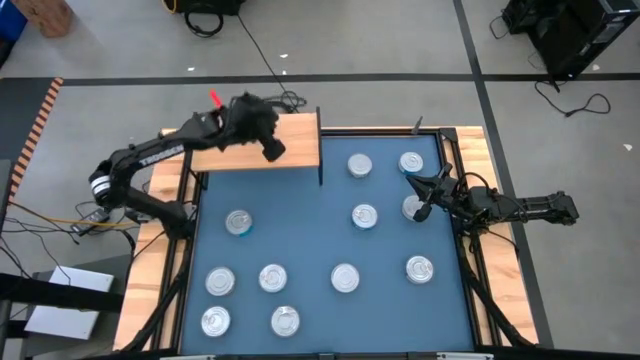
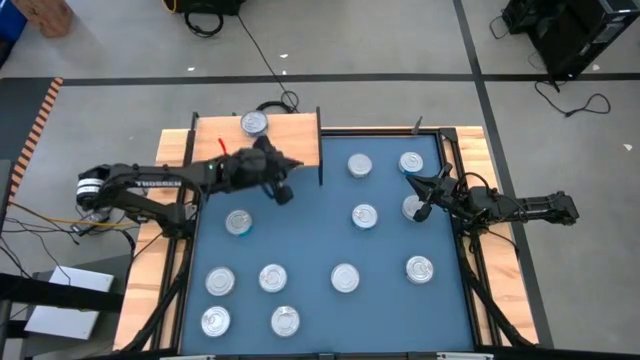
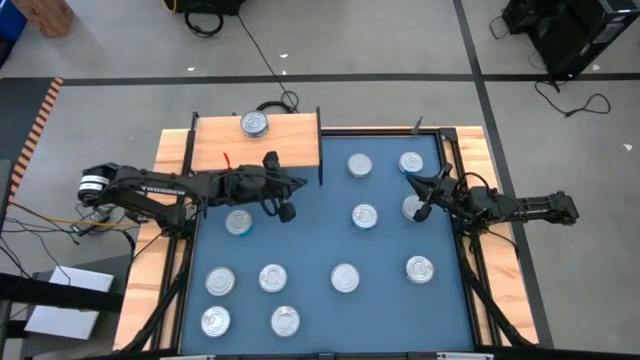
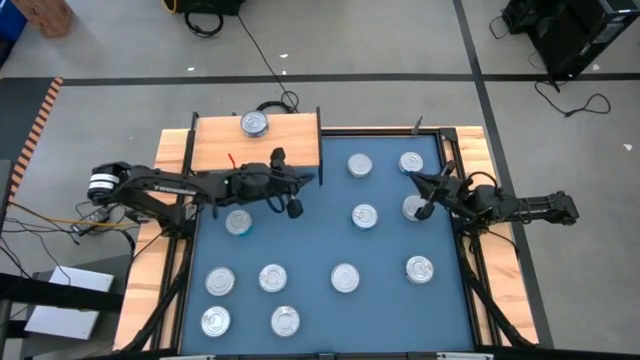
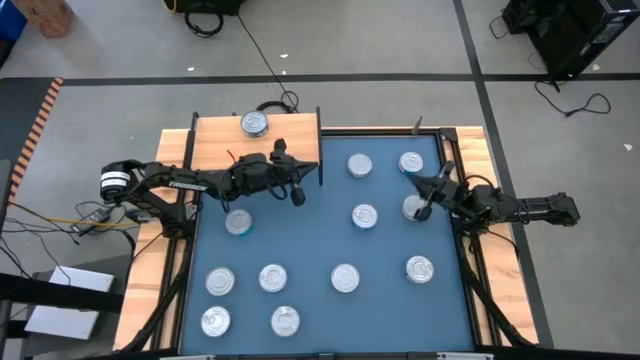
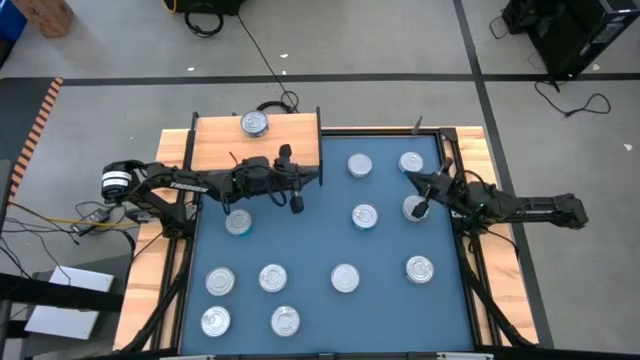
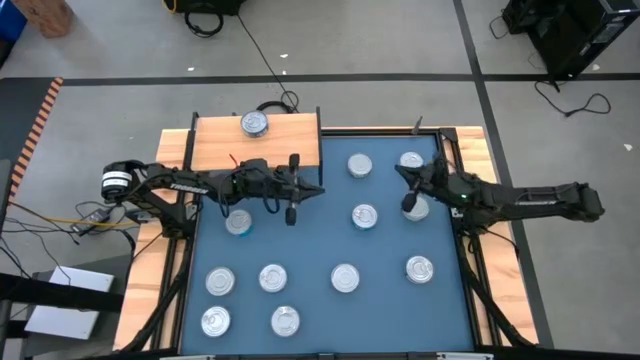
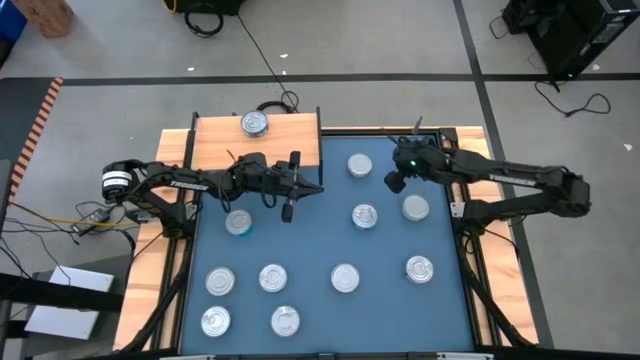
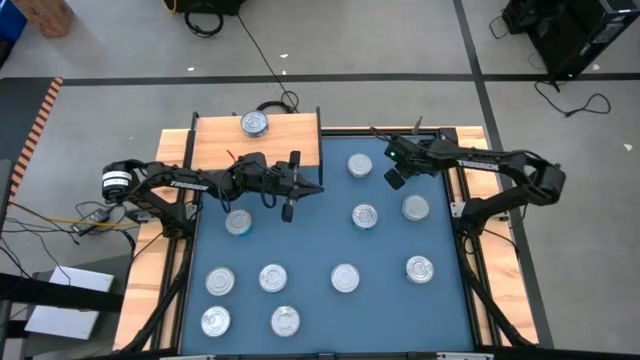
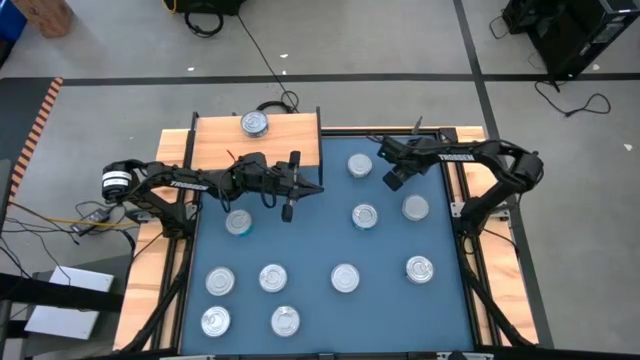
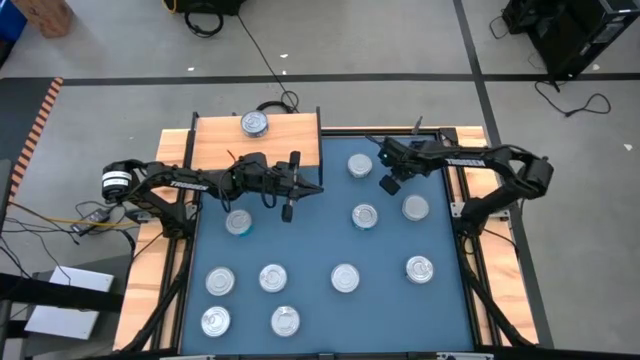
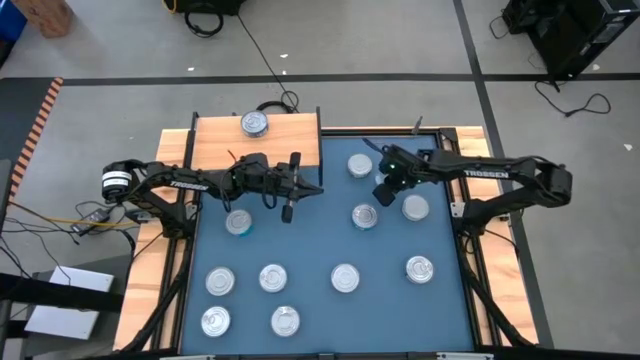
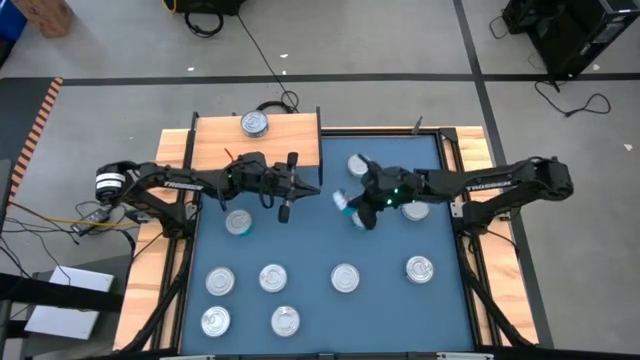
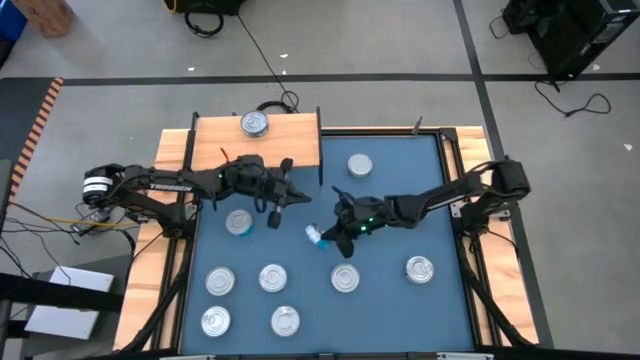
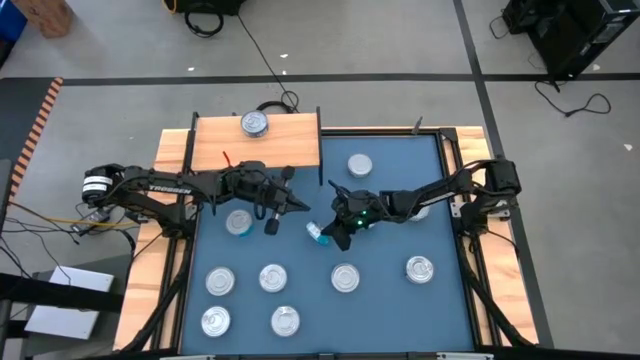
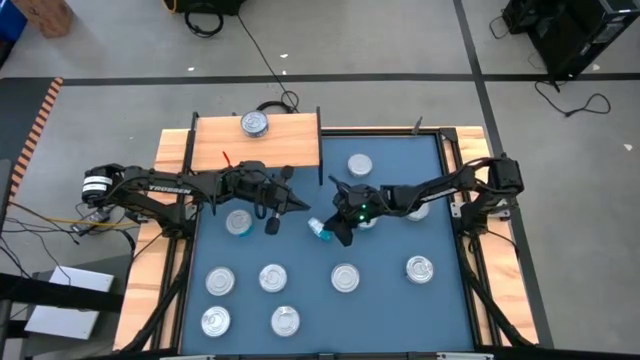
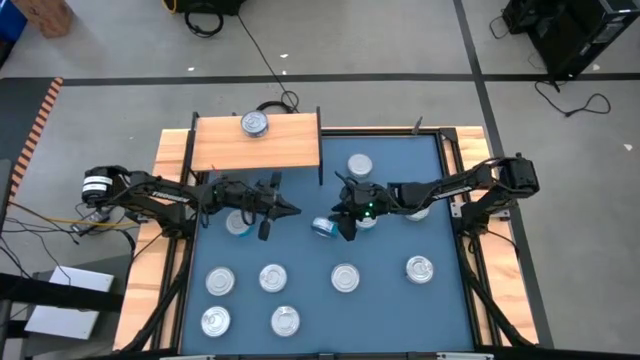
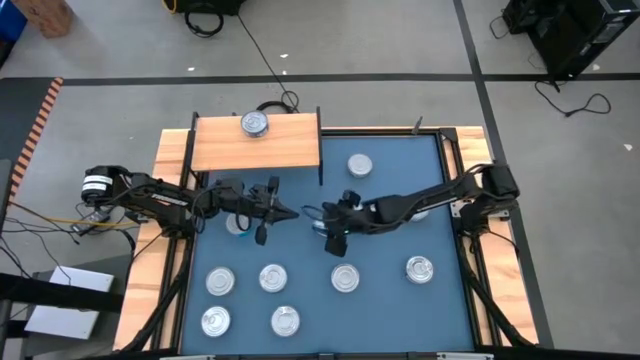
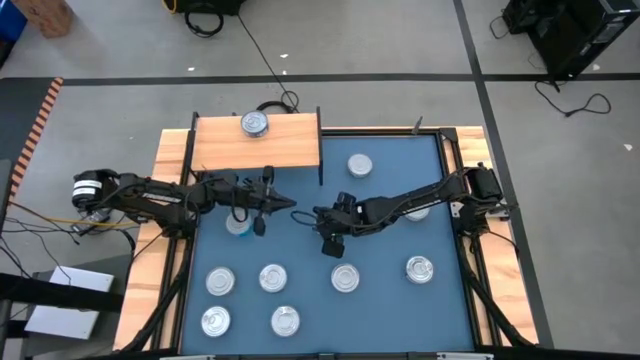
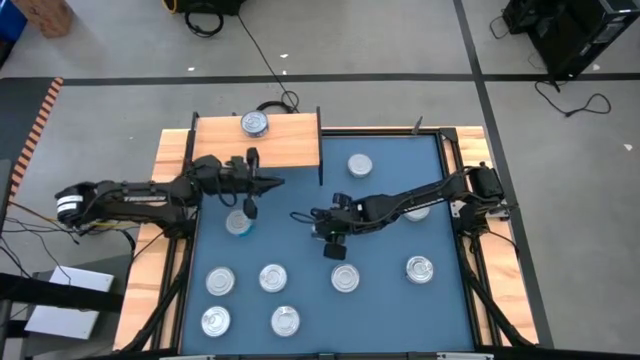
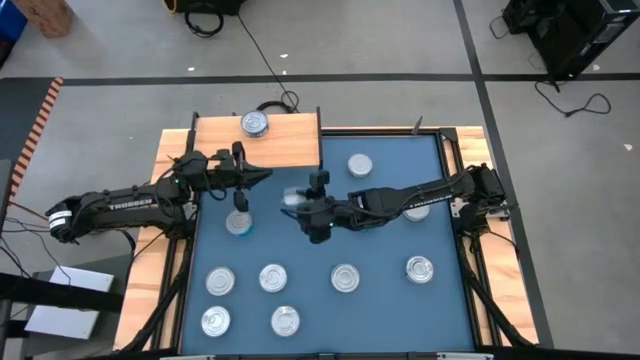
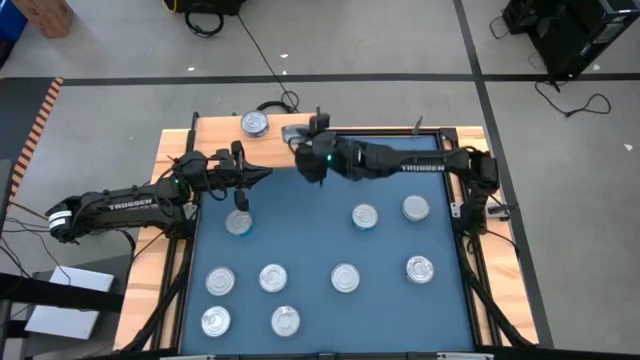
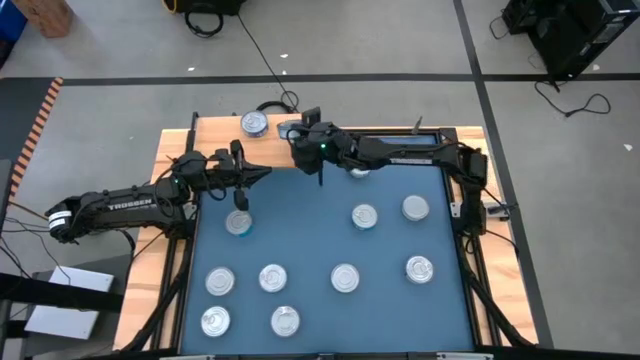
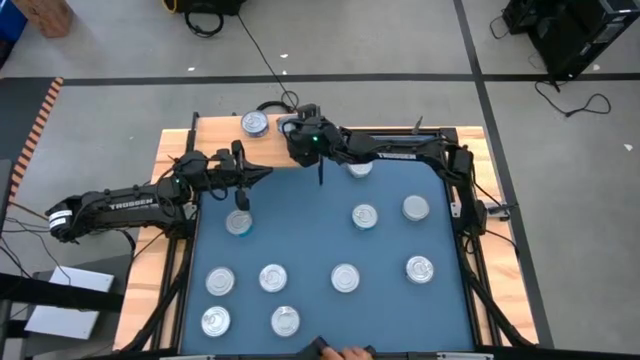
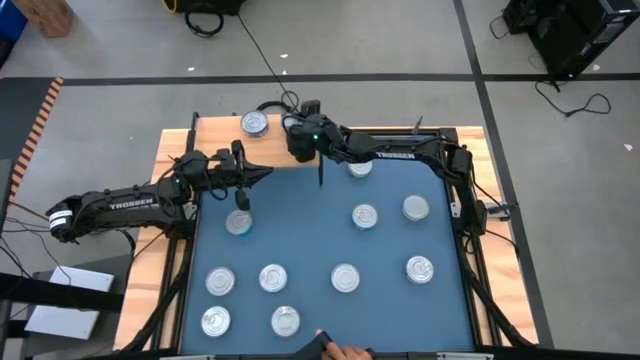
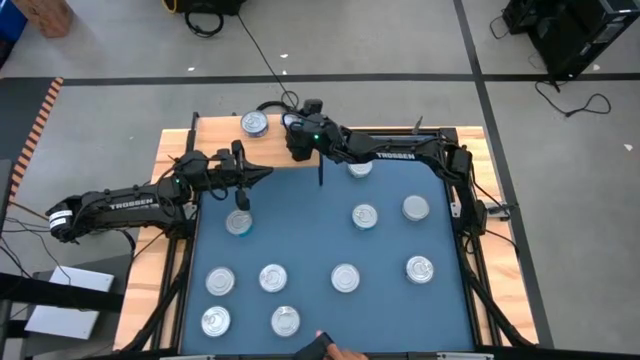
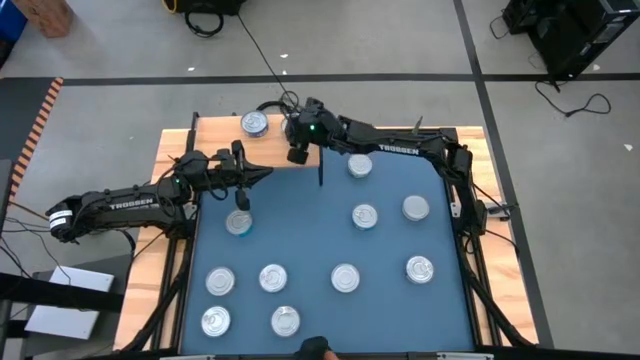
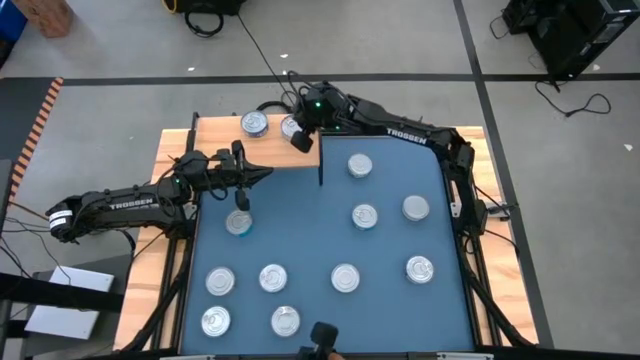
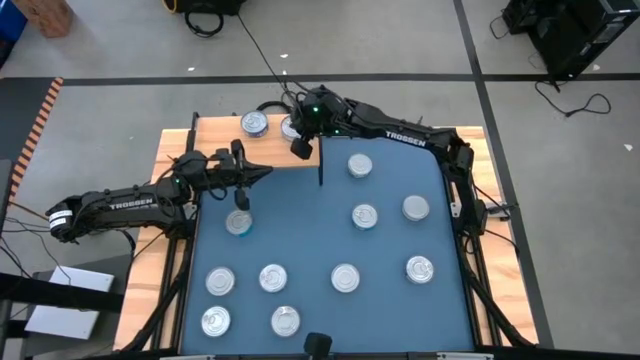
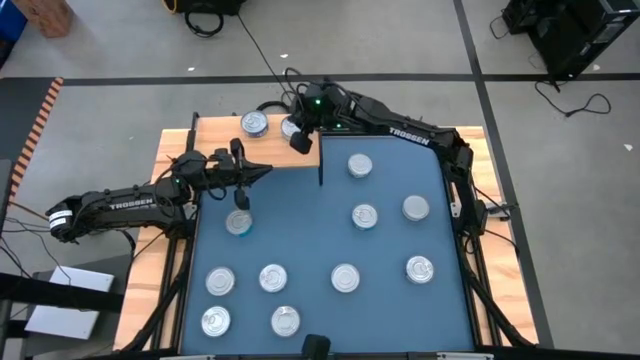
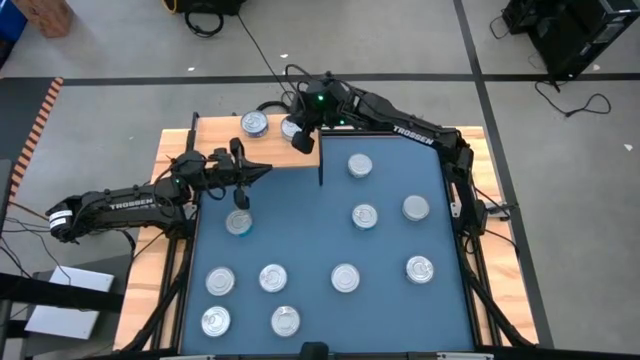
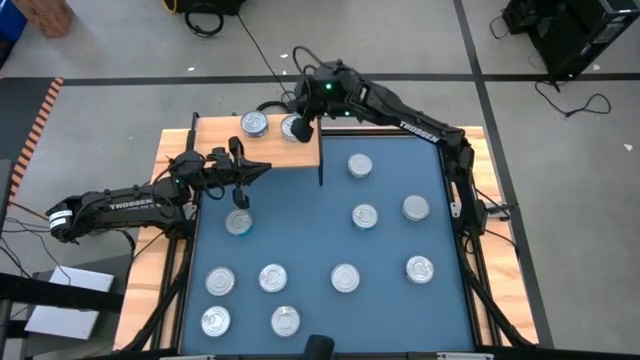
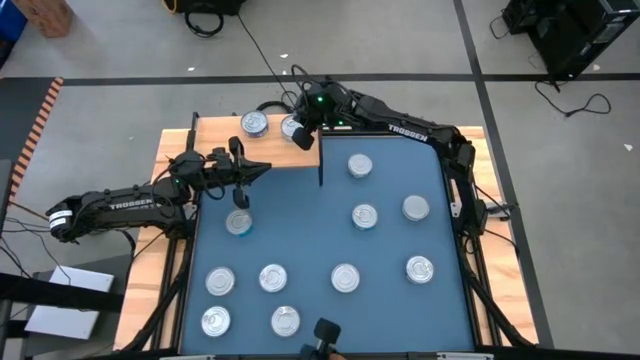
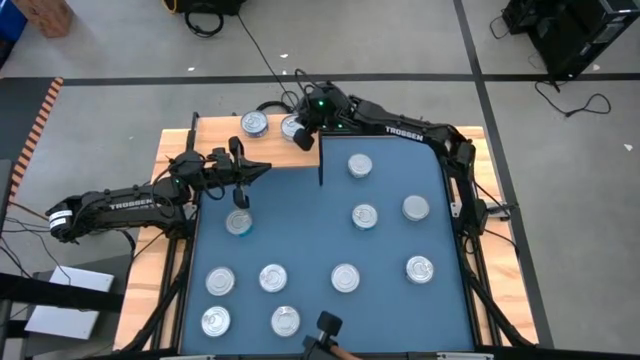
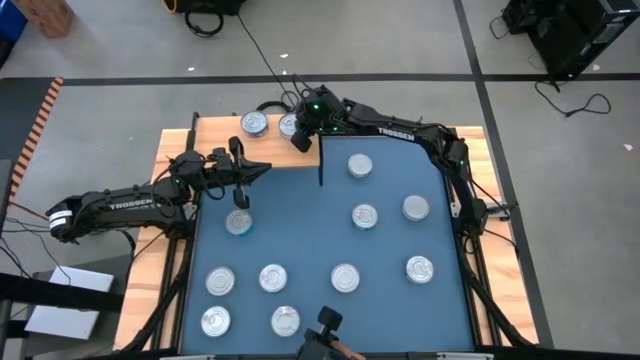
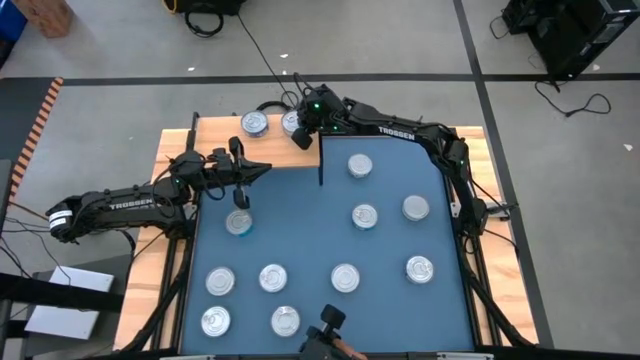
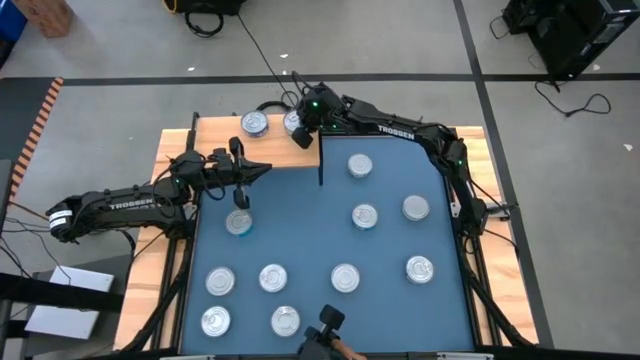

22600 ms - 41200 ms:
Task: Stack canned seafood by type on shelf
Put the yellow blue tuna can on the shelf
